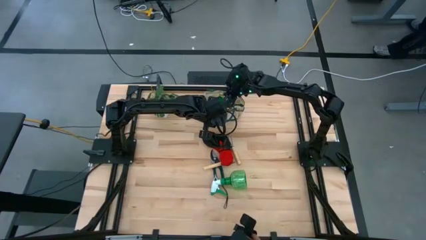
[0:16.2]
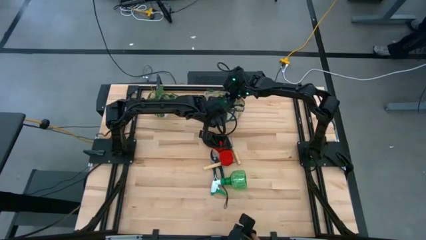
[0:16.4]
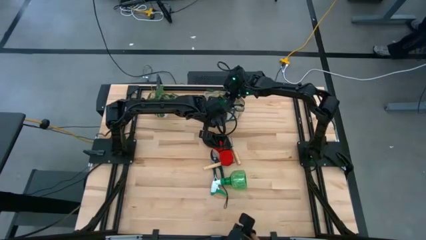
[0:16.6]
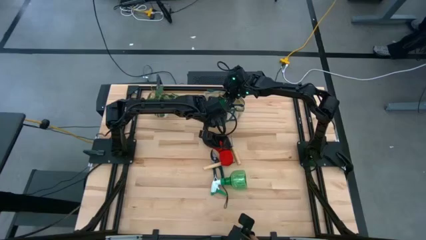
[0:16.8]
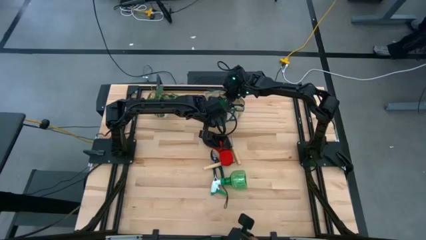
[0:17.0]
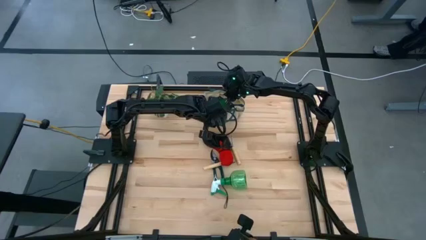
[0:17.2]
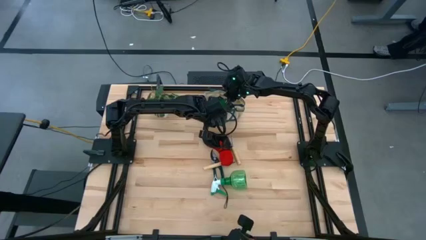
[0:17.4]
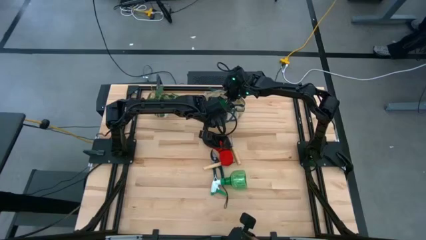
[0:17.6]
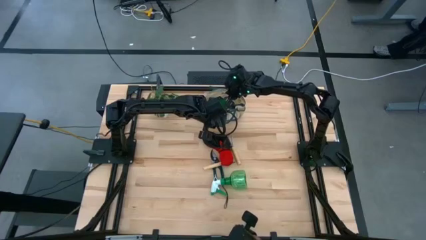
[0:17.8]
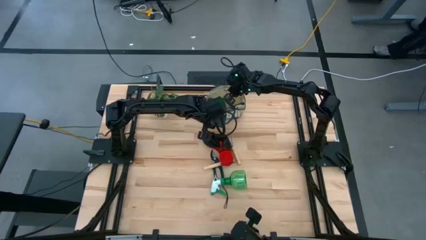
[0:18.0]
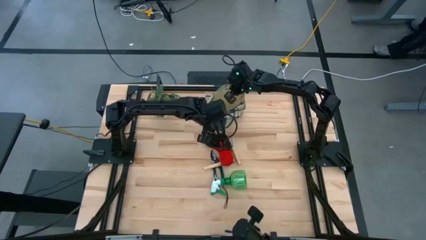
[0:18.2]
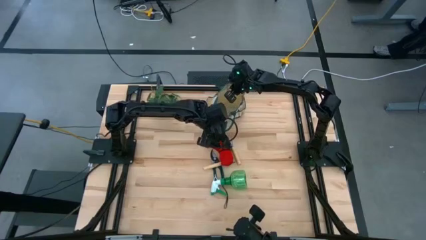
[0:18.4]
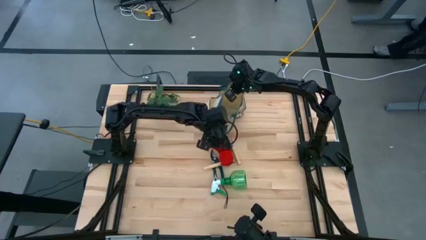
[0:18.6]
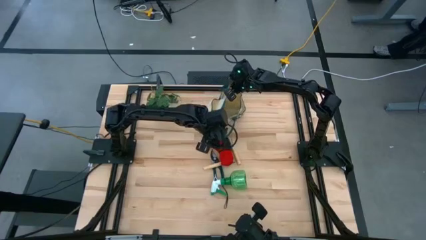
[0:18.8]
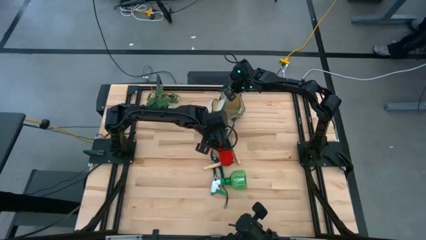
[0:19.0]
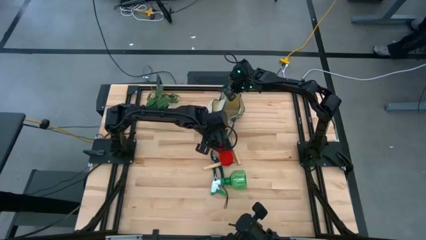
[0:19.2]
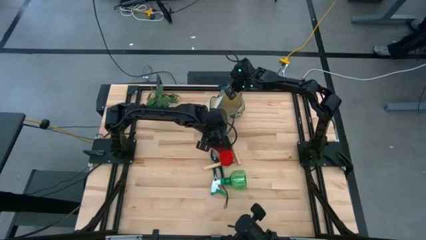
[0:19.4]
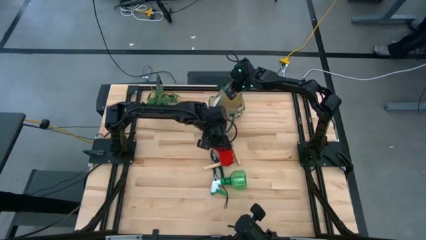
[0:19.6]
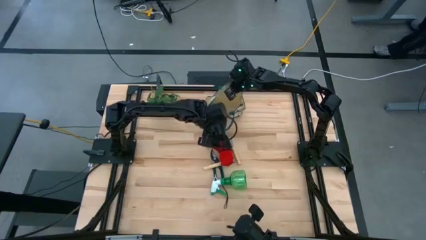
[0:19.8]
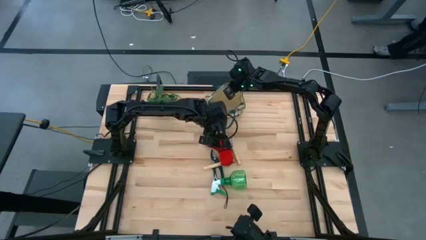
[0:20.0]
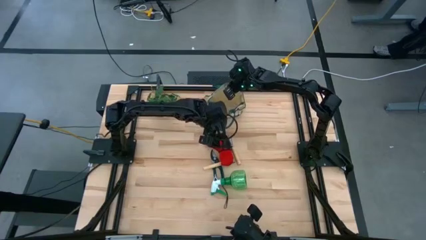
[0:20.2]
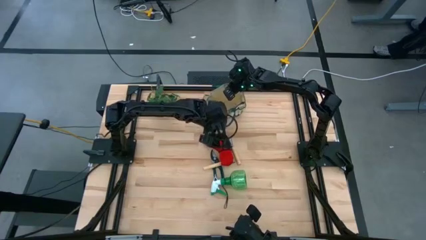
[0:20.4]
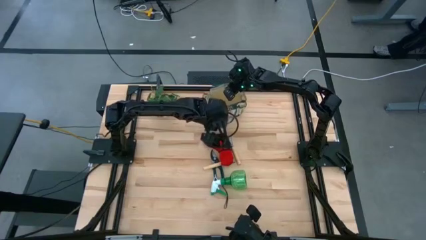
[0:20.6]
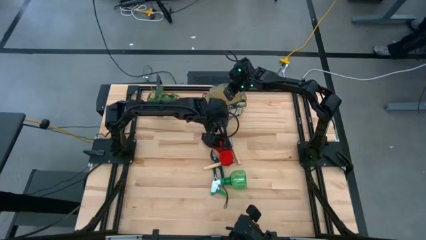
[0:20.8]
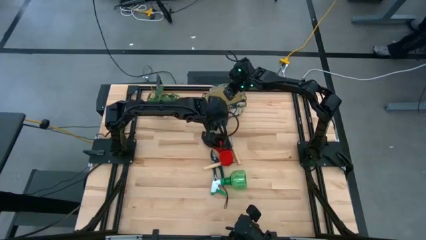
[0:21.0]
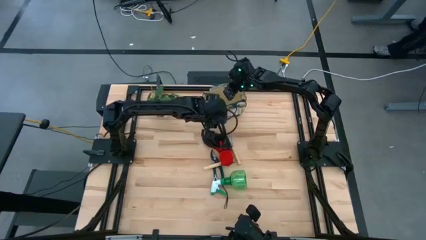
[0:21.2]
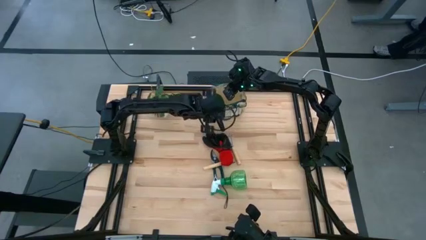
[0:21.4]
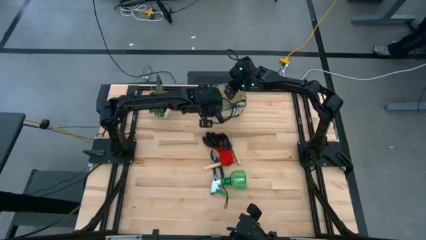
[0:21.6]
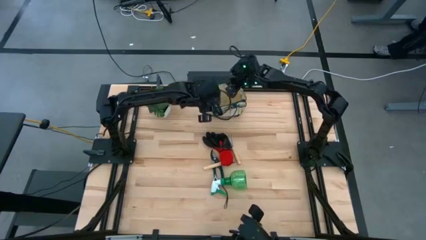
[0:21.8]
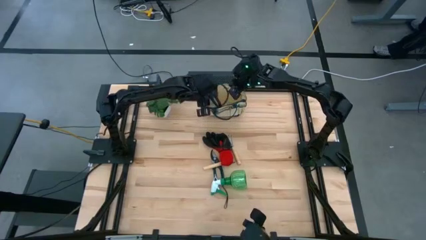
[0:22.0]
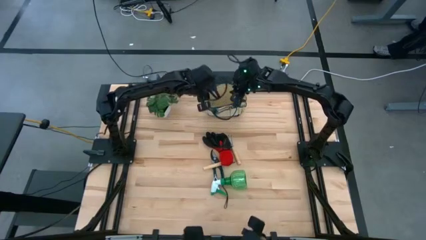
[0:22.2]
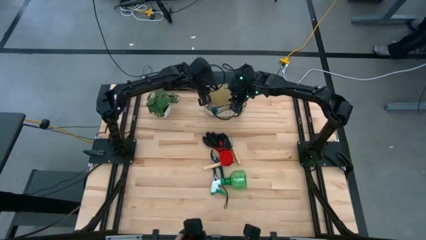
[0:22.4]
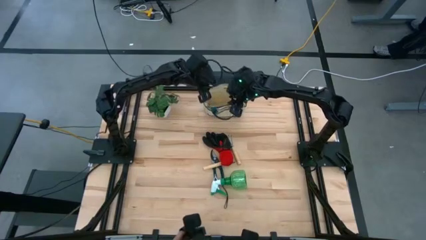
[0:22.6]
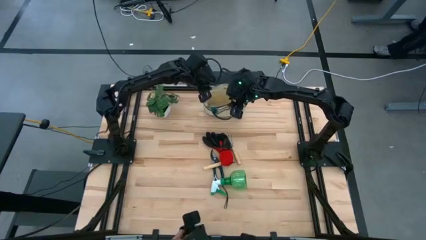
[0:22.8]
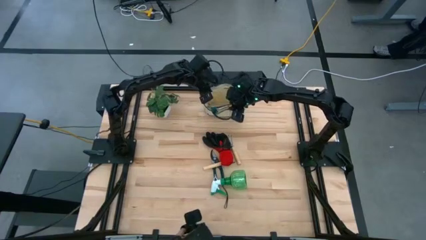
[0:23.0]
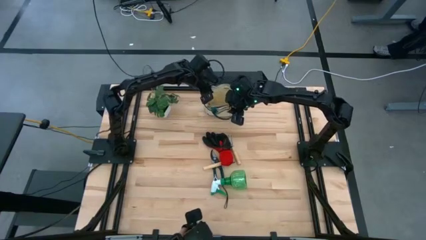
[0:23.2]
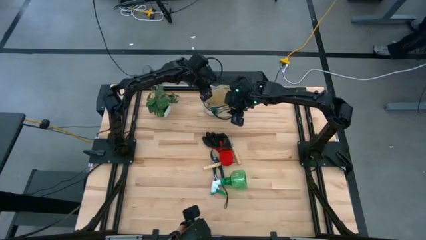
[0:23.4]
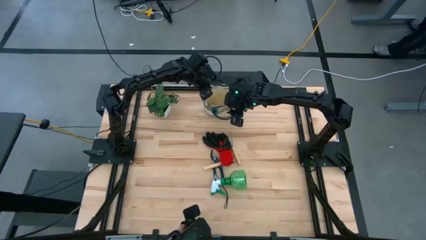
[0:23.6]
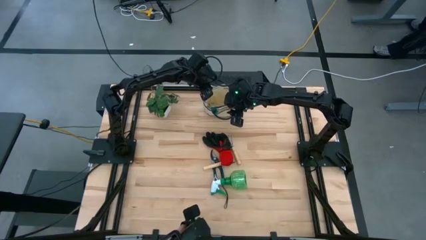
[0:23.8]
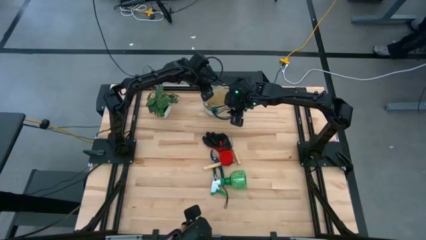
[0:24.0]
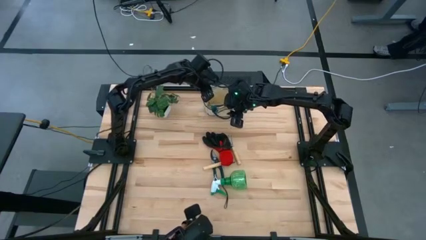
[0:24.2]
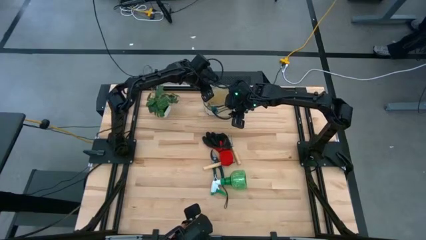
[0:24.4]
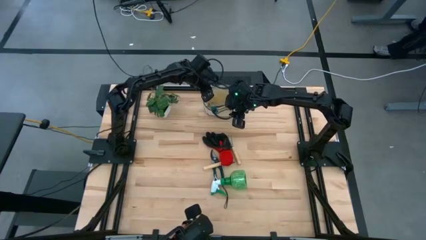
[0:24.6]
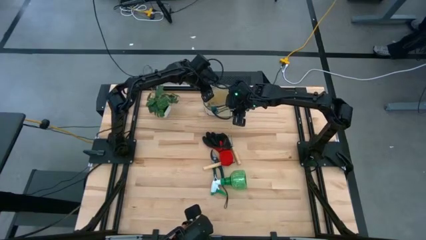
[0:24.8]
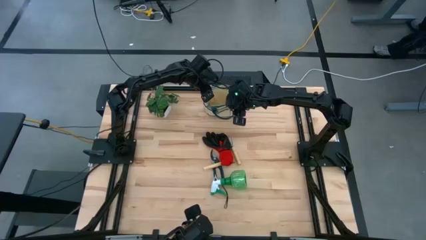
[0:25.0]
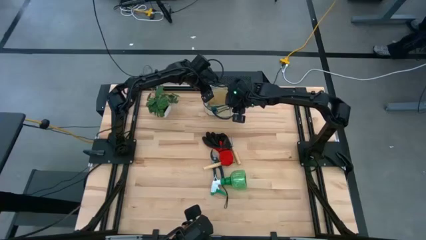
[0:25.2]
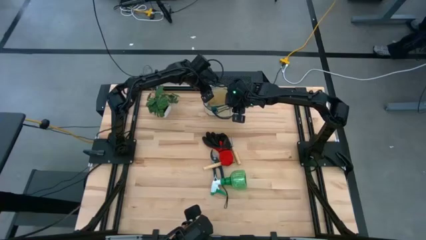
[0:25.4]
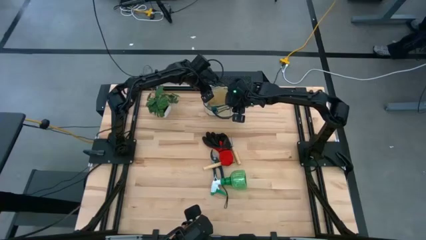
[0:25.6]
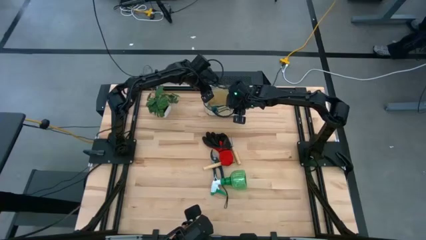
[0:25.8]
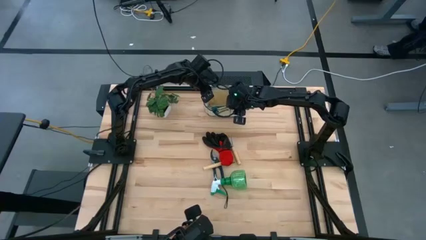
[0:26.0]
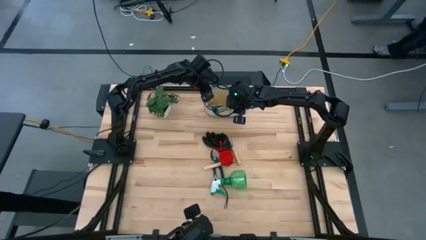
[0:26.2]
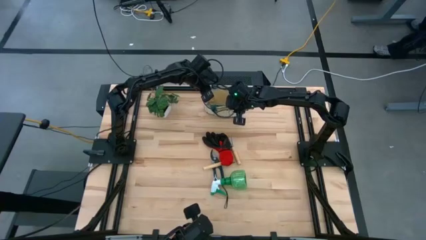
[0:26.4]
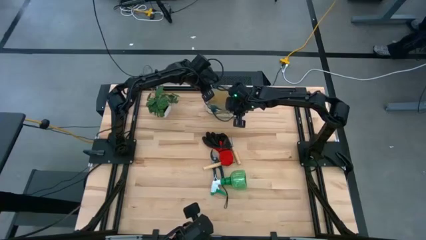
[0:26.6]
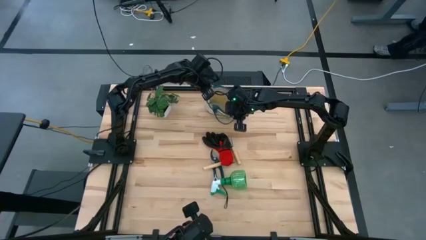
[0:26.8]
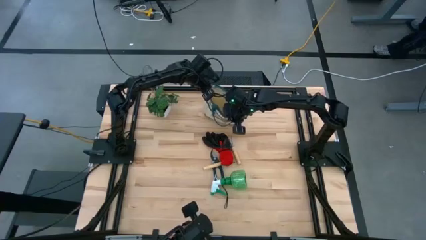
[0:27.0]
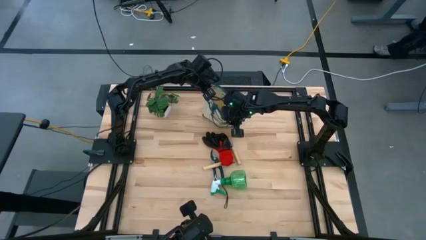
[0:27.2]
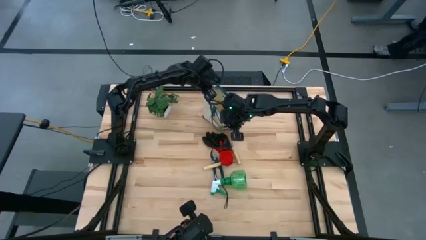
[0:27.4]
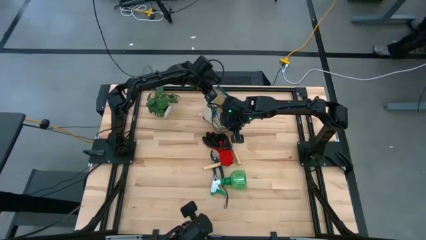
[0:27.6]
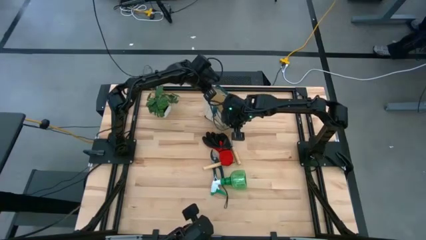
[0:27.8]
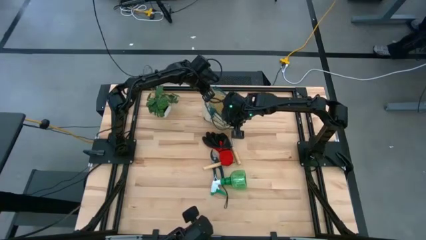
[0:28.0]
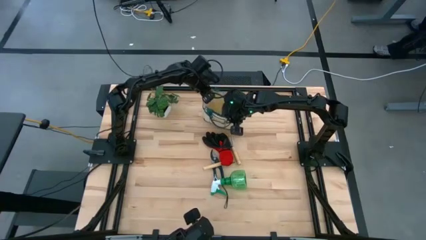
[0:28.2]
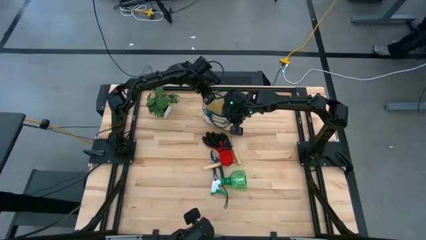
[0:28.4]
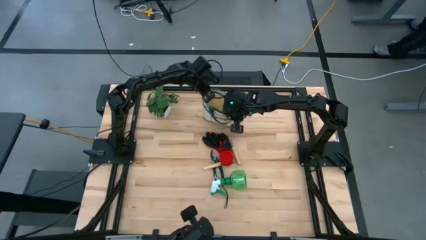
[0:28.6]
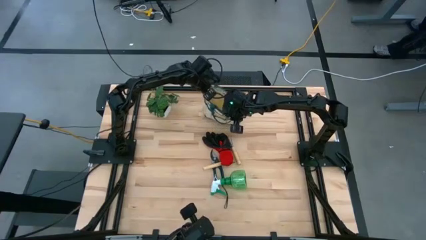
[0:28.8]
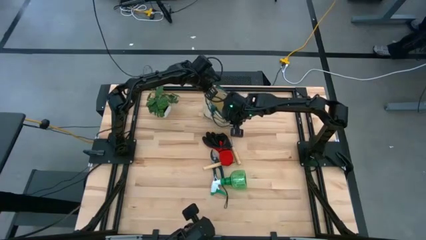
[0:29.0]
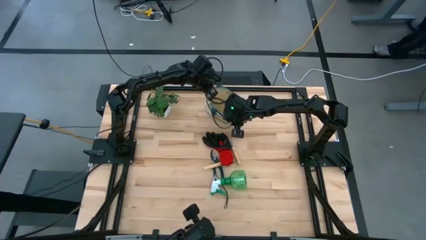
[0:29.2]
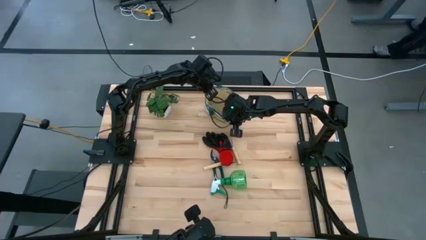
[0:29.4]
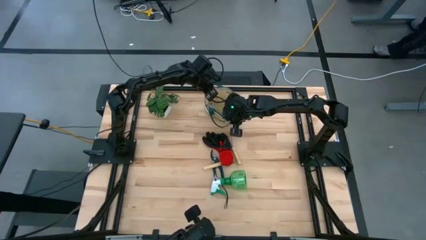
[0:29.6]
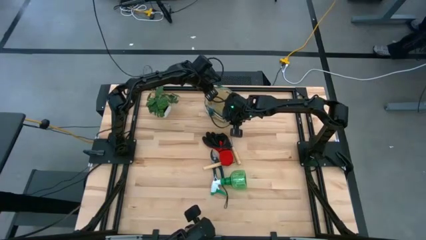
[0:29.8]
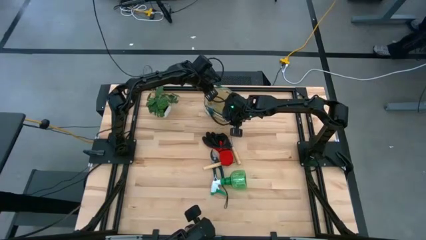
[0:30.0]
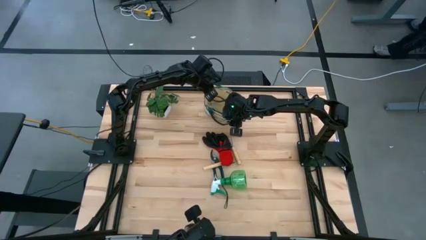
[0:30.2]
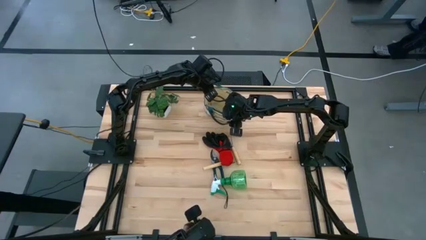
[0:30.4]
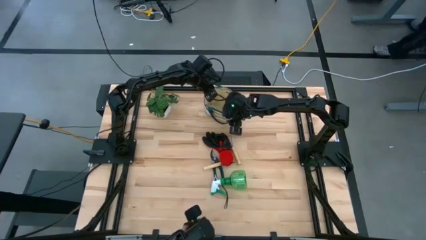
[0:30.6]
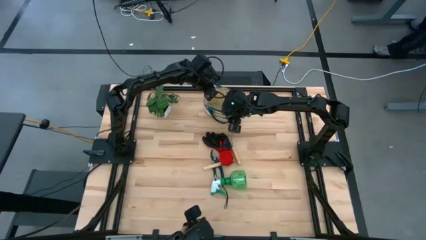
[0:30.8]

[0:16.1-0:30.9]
Task: Pick & Place Garden tools in Gardening bag
Prepare the gardening bag
